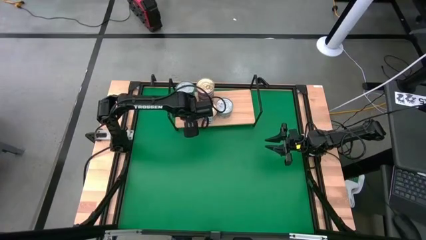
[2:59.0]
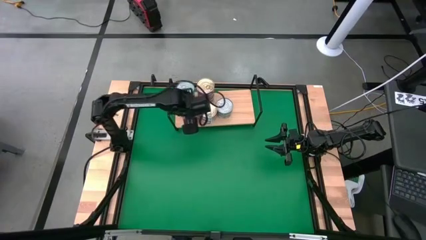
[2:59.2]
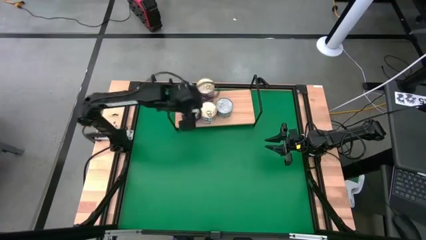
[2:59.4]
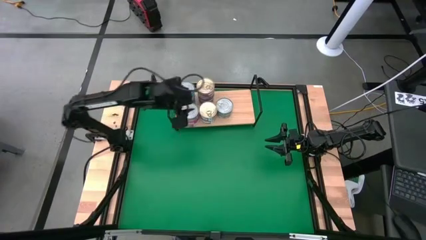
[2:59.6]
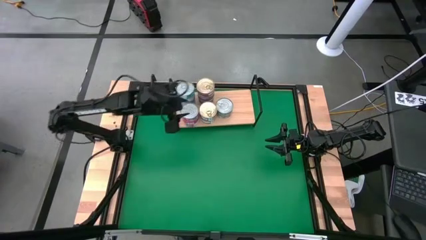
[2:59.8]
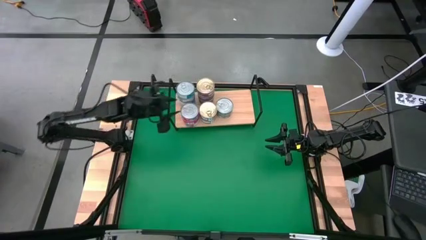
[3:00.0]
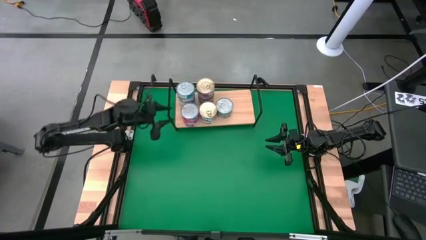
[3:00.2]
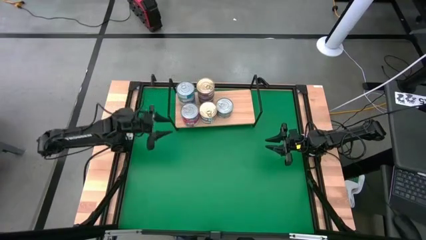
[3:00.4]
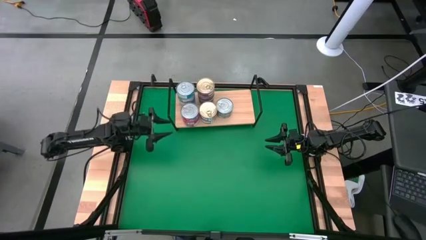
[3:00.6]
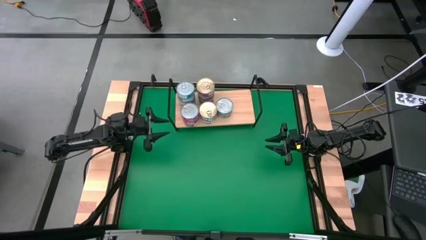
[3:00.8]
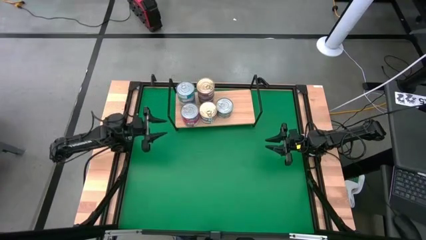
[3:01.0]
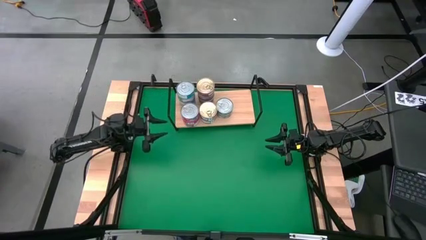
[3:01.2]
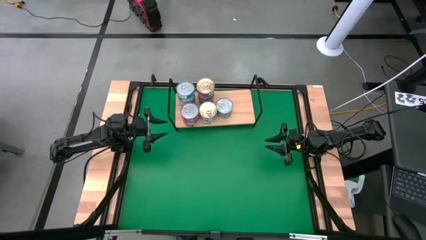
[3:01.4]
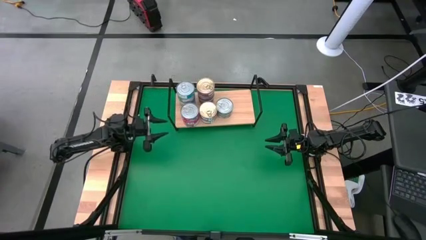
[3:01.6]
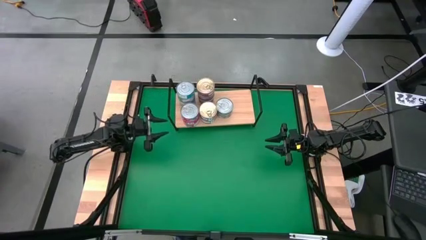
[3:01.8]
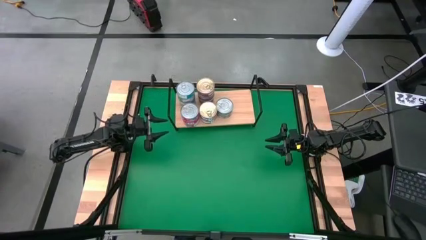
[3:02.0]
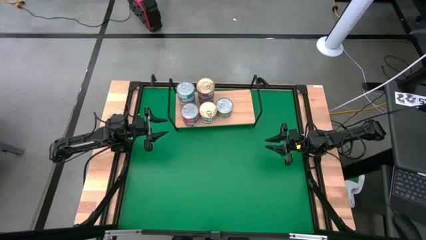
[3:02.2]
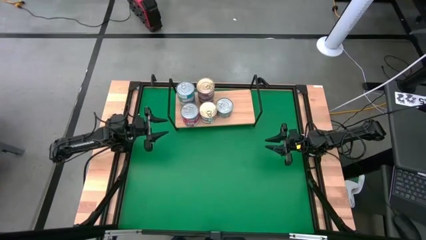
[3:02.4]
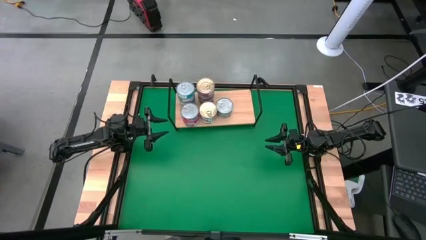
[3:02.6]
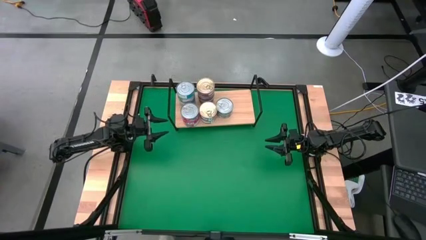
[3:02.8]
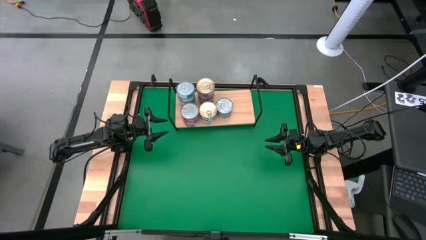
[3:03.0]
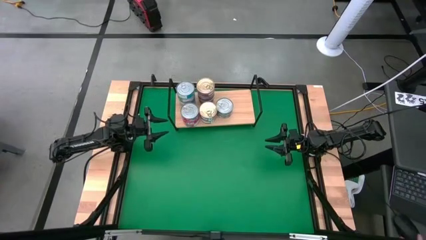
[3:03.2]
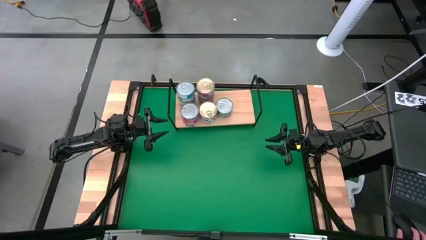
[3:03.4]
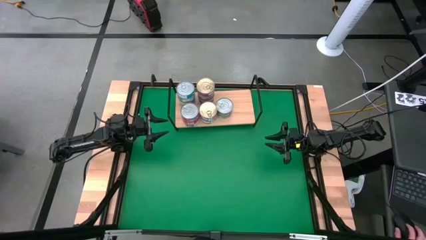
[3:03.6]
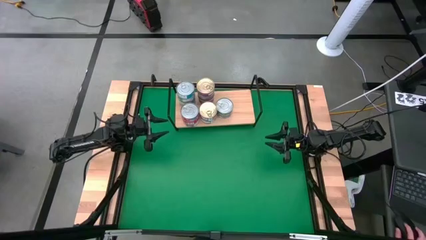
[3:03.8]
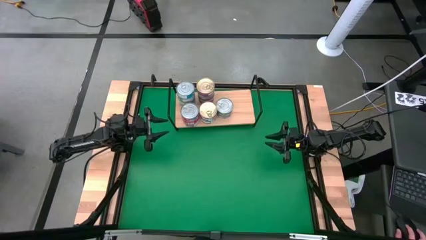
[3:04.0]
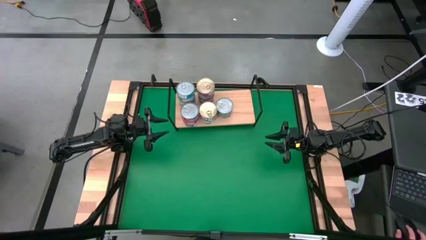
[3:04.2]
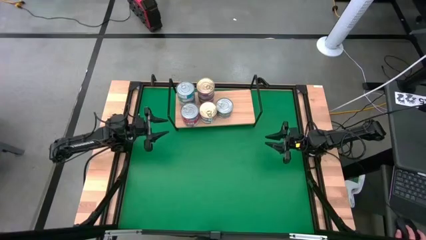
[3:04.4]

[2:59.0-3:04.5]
Task: Stack canned seafood by type on shelf
Return to Home Position

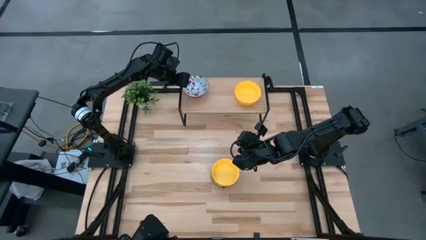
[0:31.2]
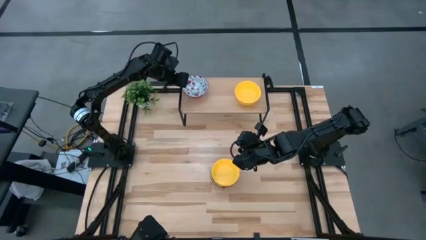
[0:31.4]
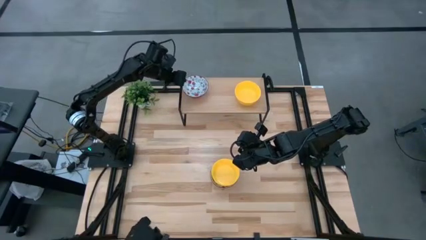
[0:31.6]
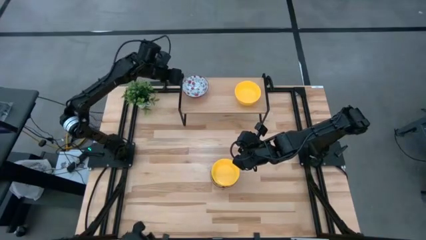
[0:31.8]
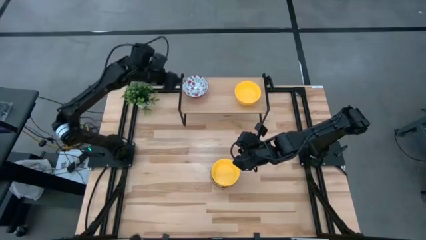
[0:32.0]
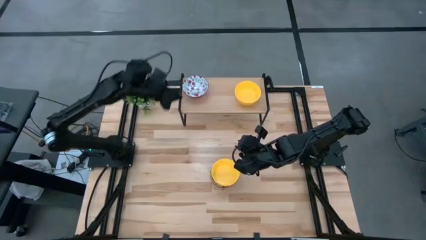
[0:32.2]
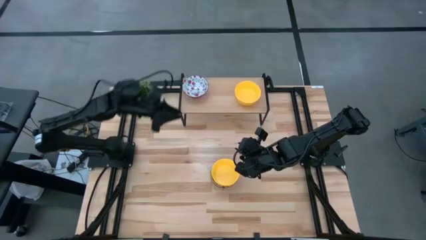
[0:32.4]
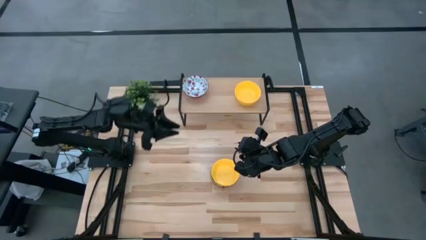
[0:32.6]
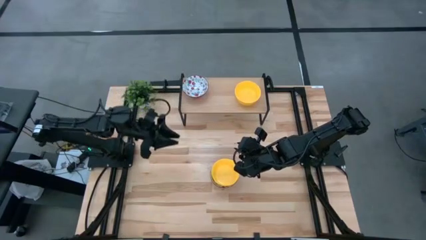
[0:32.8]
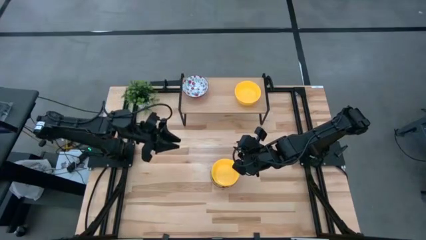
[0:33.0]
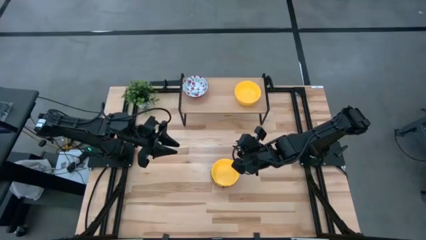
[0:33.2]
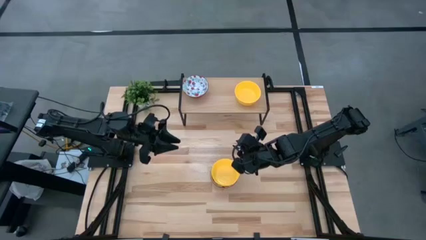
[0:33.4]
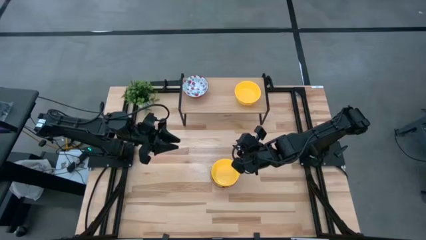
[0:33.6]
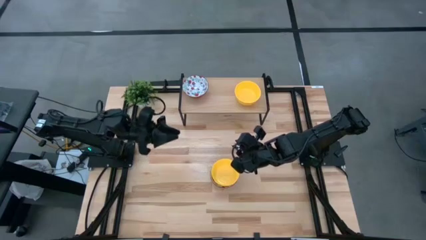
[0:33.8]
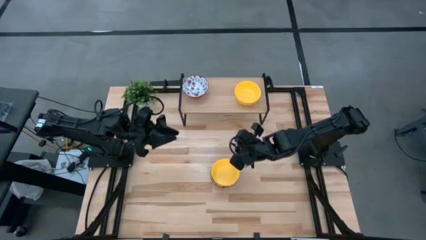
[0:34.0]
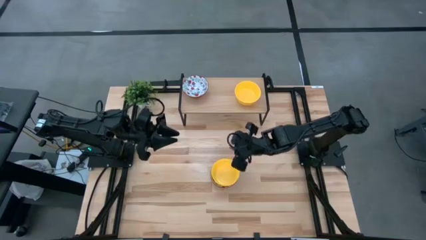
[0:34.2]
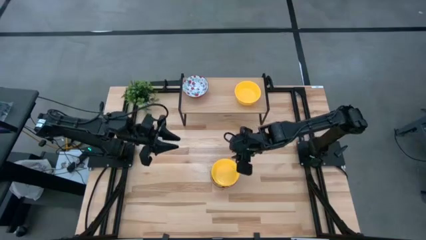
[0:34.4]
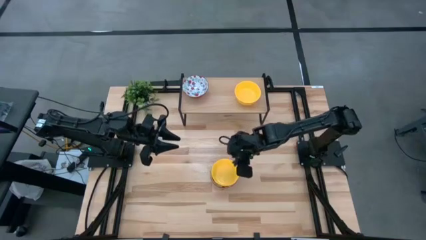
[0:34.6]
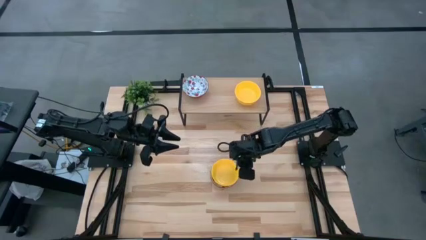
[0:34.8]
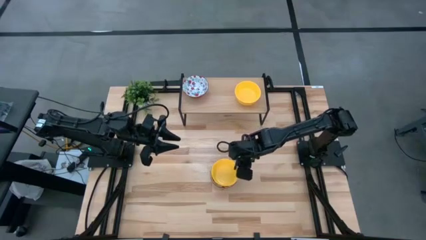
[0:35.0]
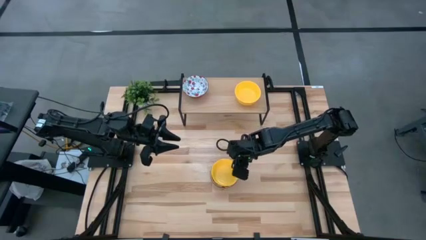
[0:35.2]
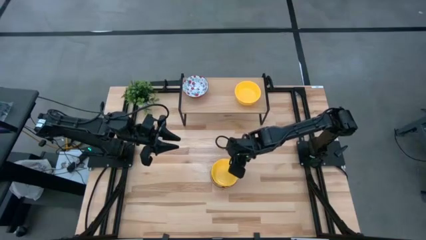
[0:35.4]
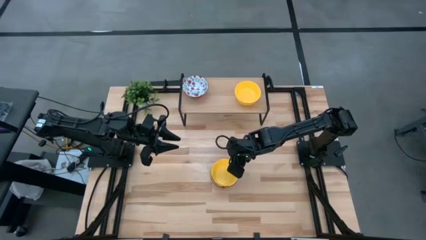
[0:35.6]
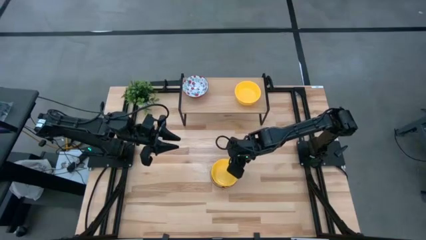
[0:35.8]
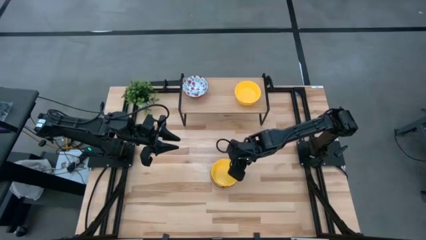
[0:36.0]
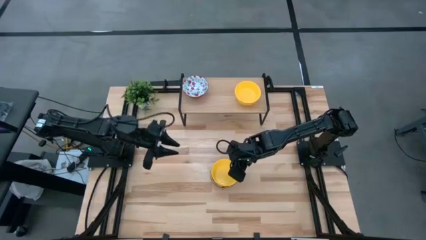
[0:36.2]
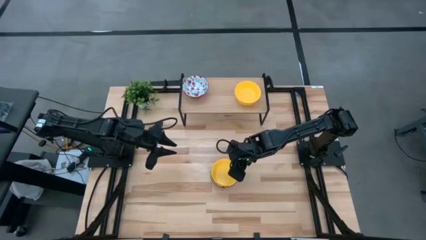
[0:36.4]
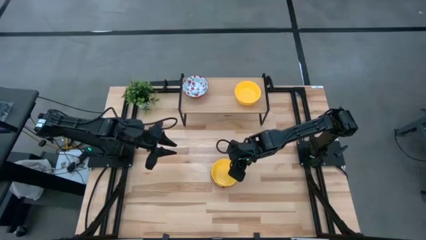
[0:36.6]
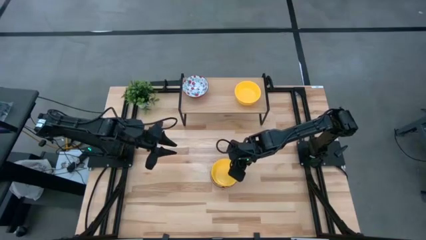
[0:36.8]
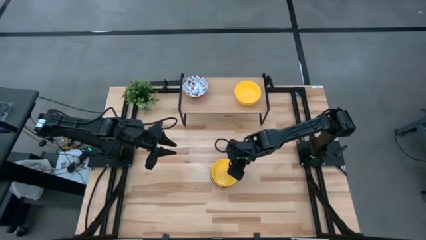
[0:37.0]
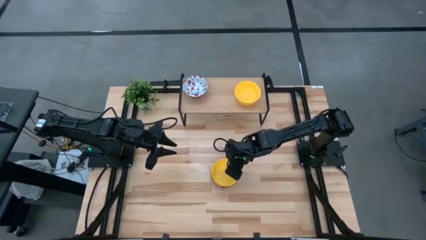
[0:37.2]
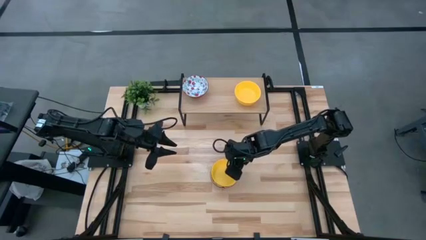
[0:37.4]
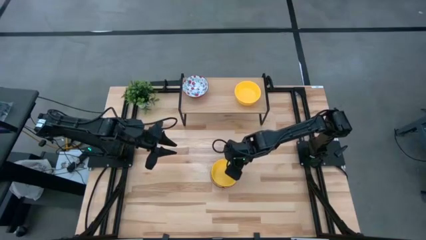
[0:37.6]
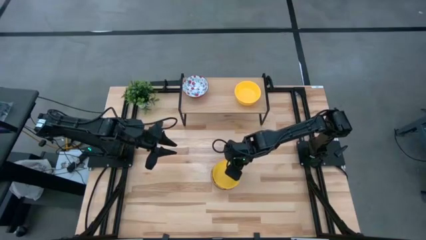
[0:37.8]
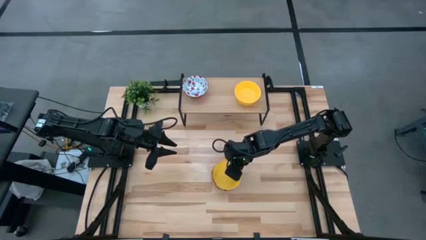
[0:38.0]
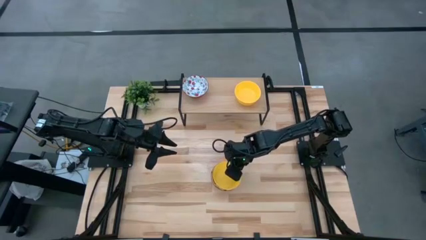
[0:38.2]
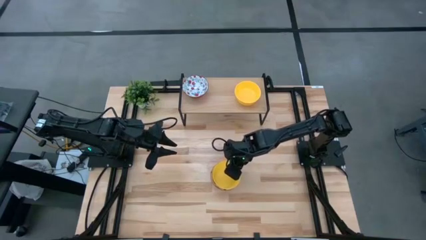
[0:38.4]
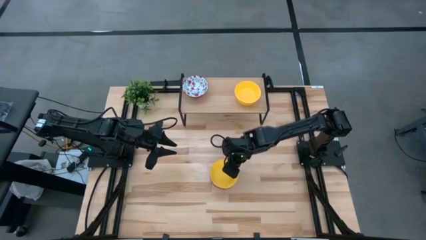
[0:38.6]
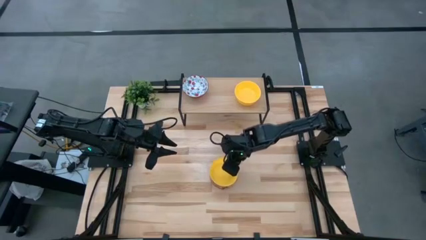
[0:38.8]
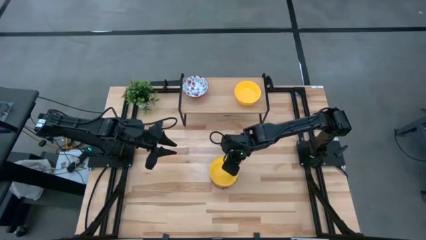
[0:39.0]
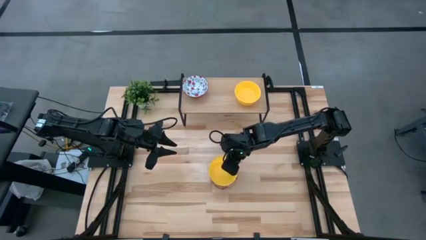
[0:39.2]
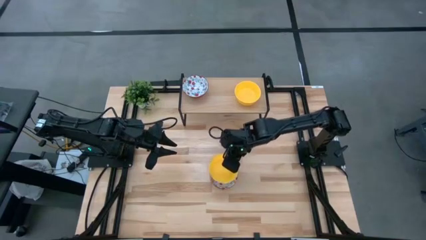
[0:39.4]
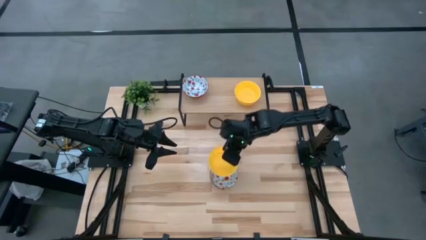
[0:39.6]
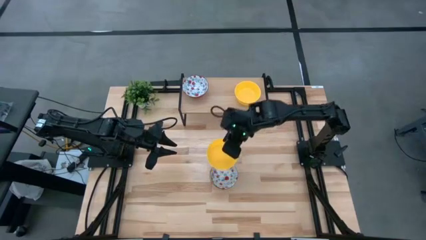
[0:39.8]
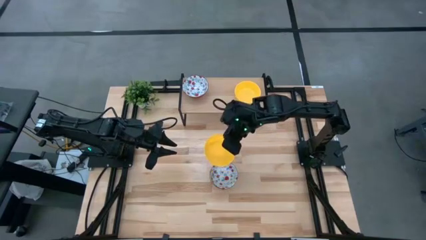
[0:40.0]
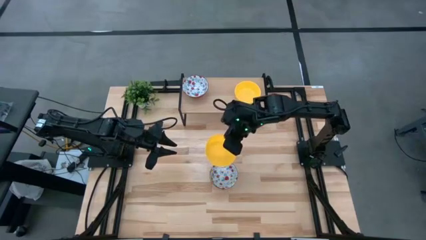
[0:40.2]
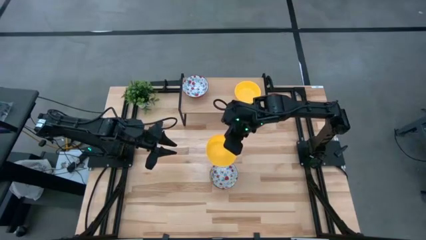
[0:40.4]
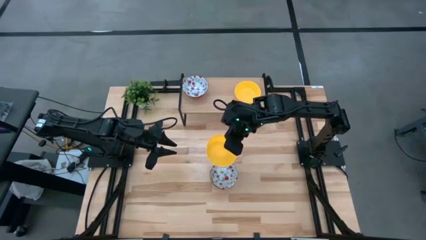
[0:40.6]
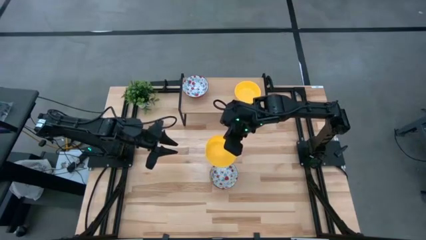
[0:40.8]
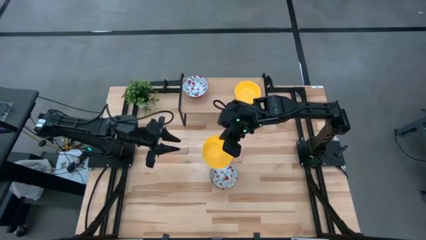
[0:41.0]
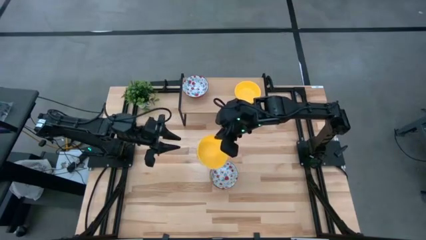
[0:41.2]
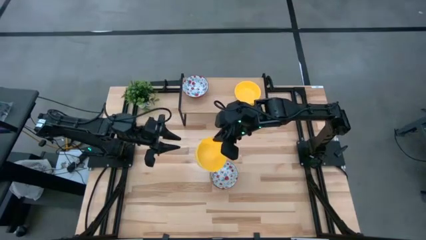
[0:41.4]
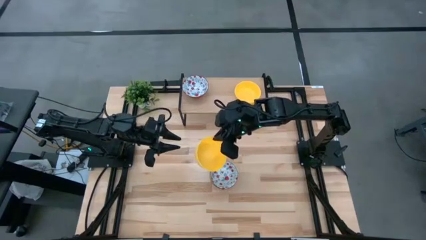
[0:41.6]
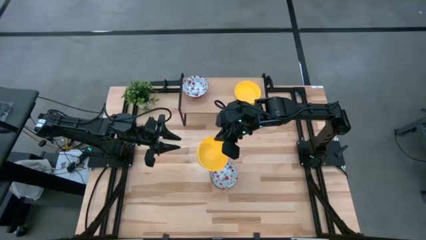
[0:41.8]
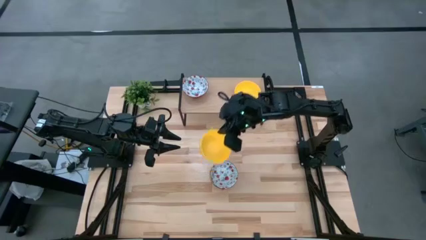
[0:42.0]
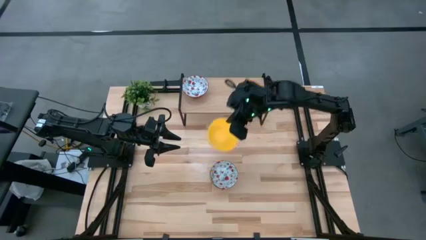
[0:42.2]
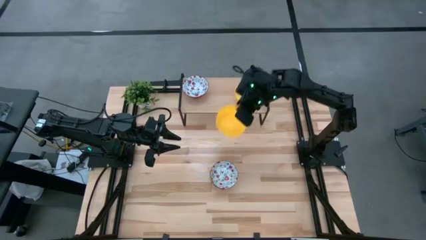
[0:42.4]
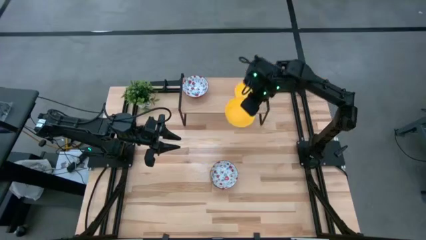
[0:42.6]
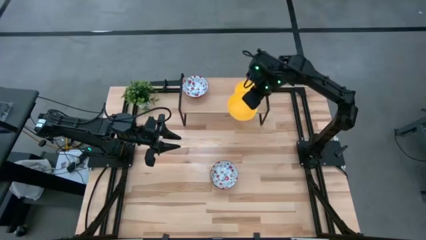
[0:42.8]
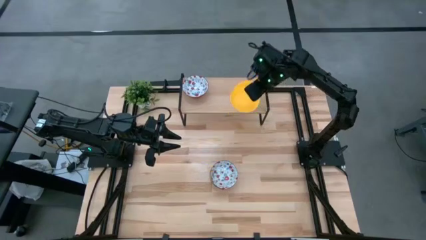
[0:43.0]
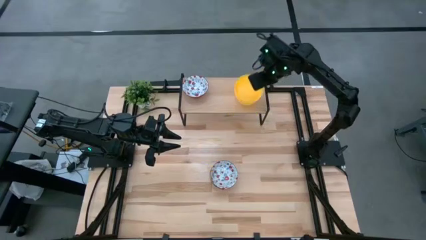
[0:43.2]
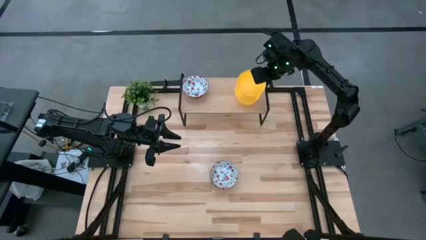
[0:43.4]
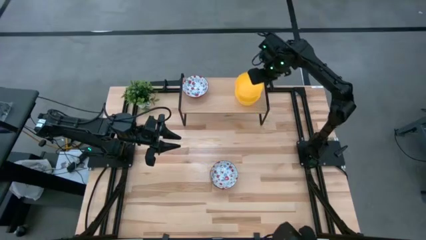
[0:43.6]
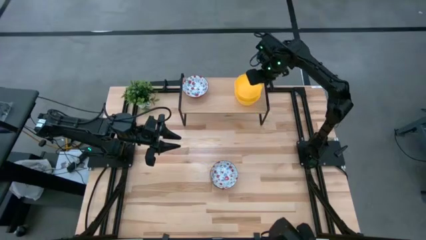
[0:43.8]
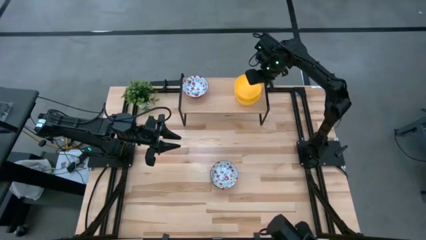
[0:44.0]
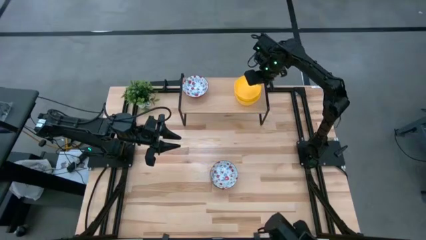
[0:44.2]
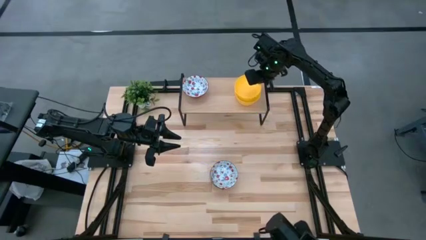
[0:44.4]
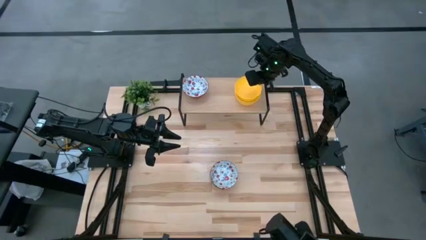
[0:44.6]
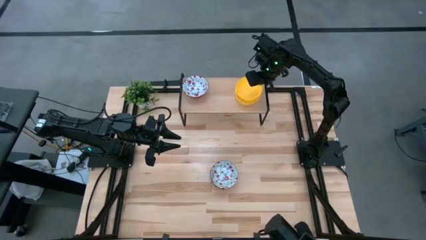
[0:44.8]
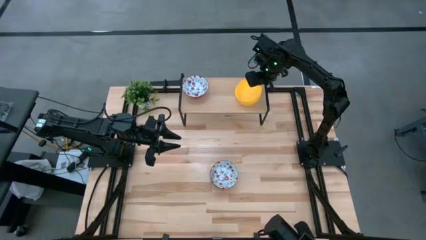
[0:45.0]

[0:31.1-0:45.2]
Task: Pick & Place Mini bowls
Stack the yellow bowl on top of the other yellow bowl on the shelf
